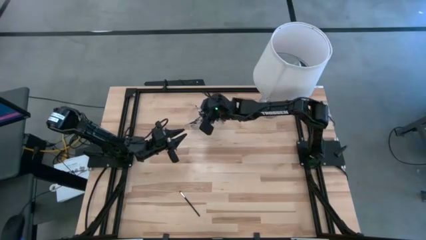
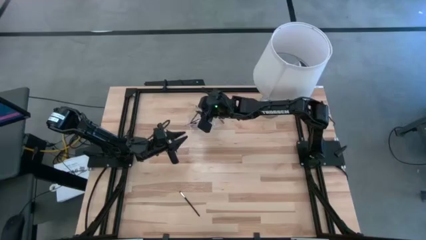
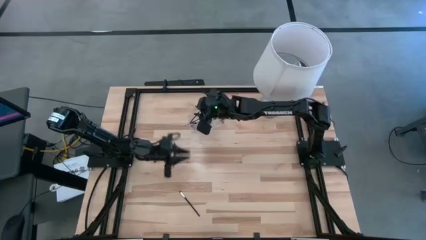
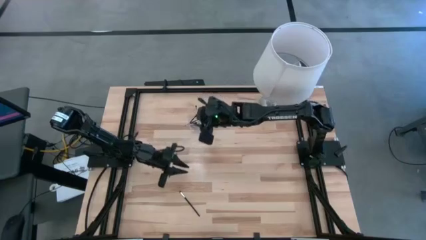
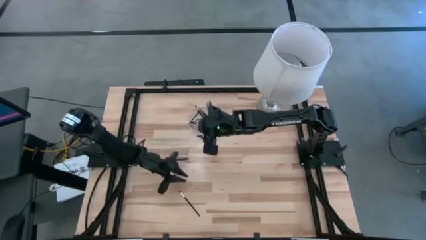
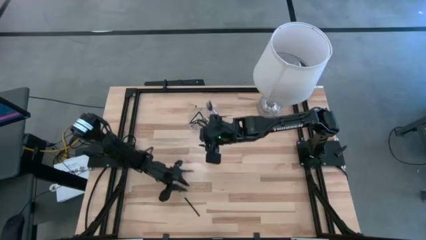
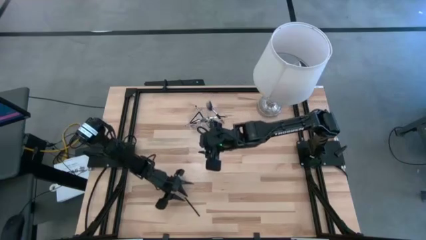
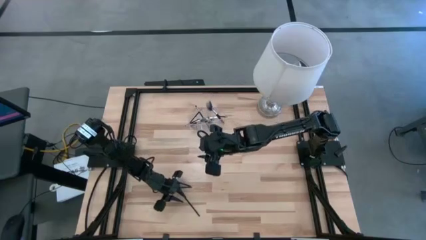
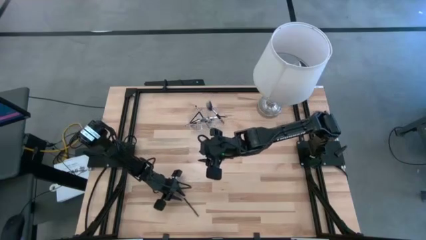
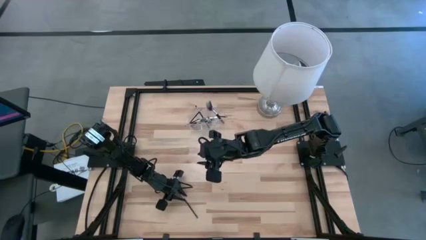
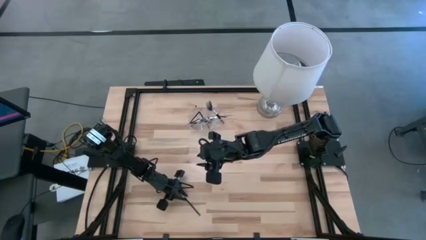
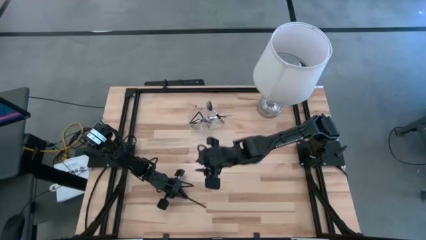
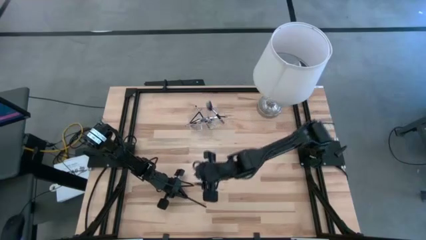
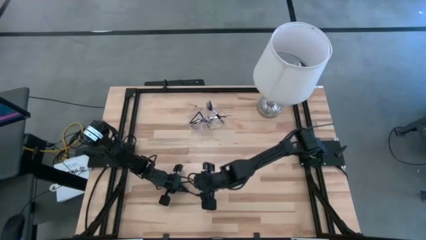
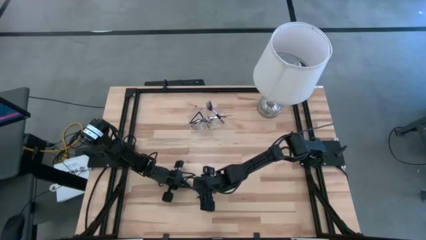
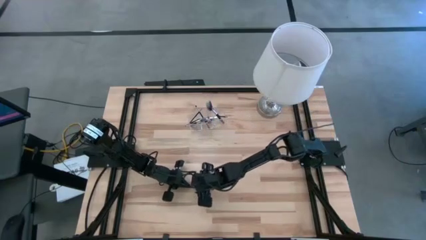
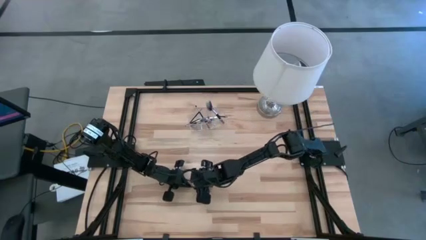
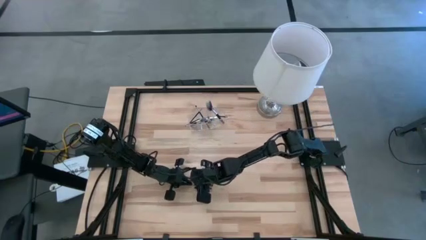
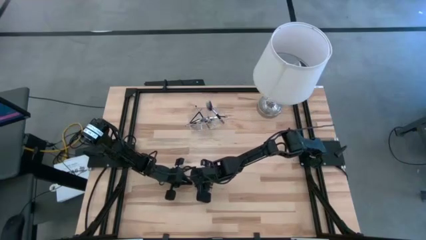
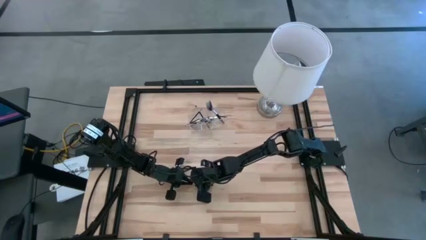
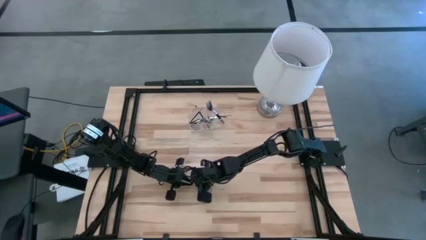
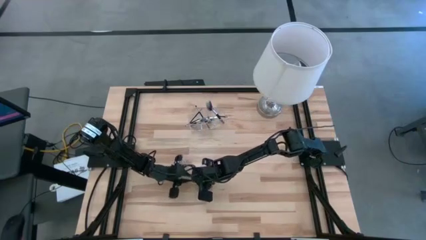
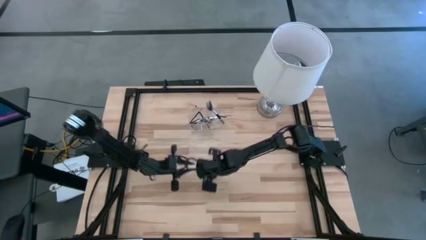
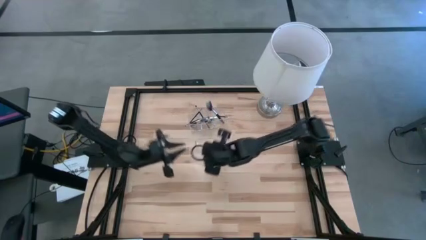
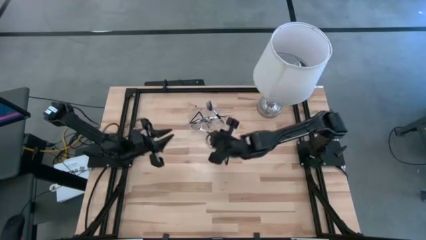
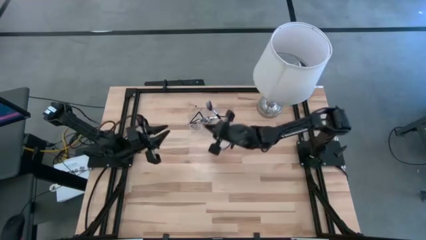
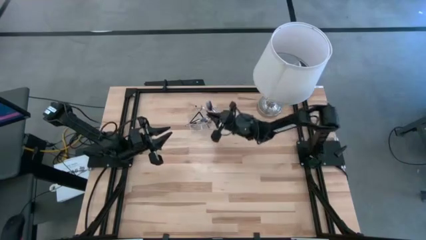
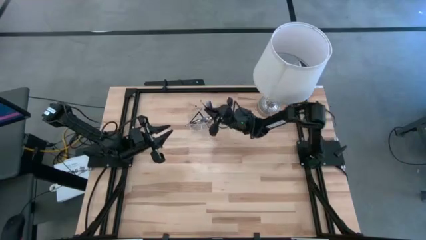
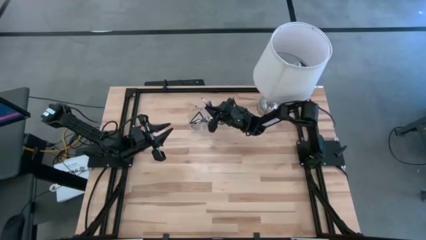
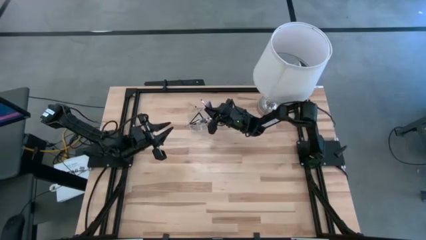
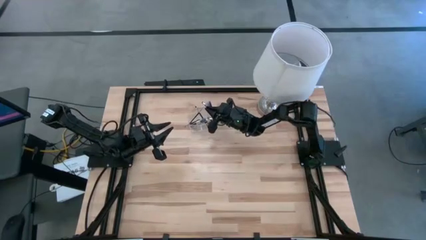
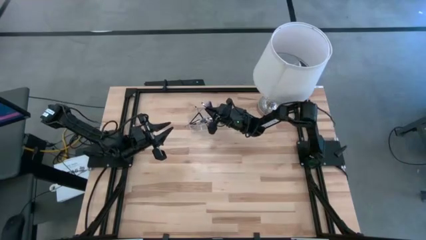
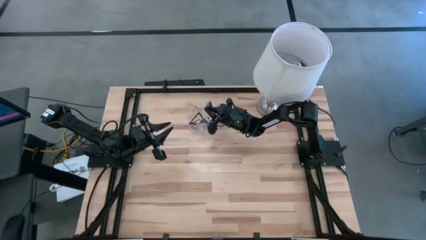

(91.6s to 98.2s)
Task: Sort items
Put the black eyeshadow brush into the transparent organizer

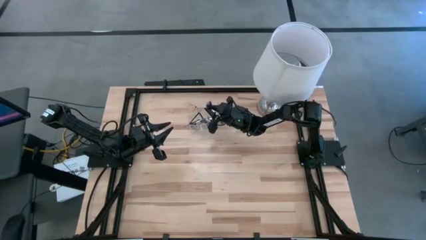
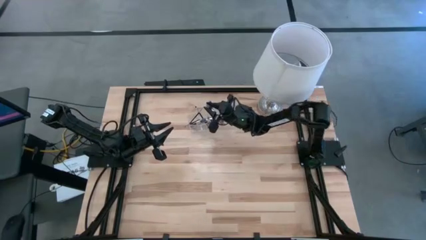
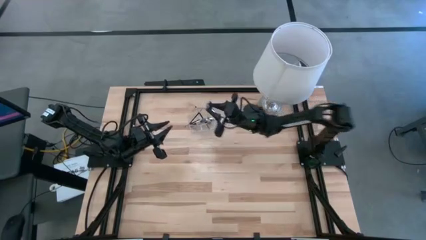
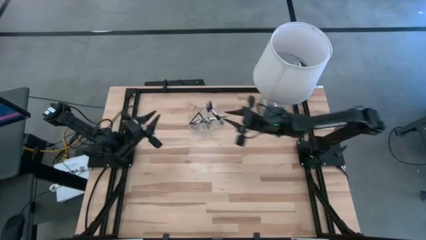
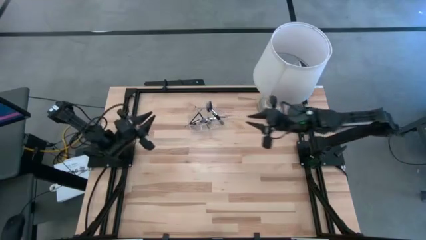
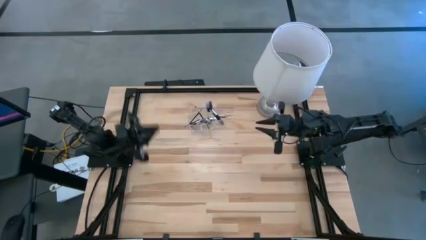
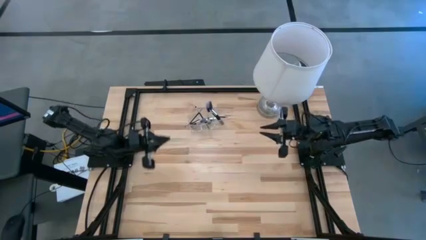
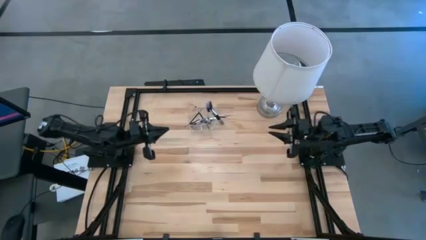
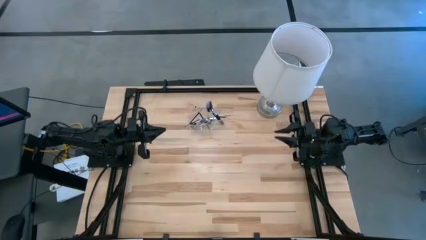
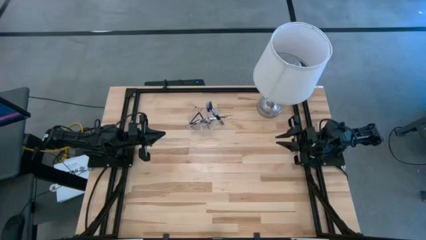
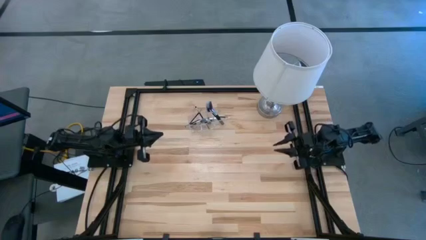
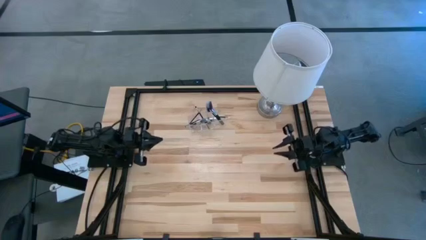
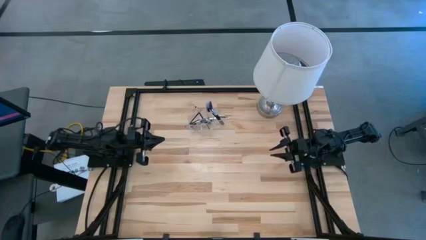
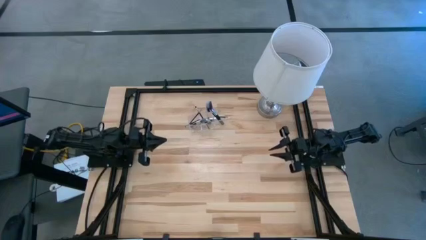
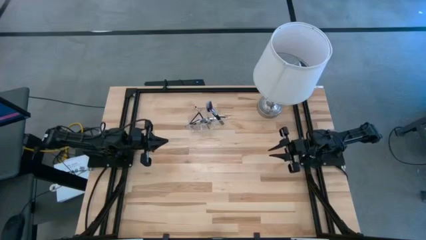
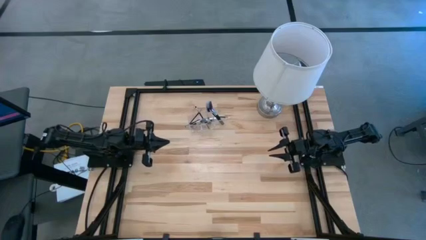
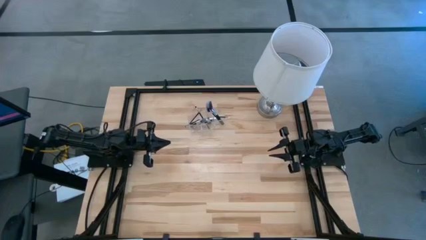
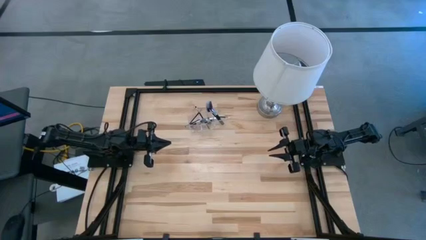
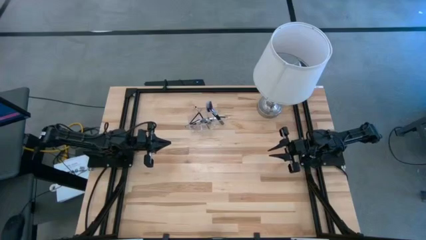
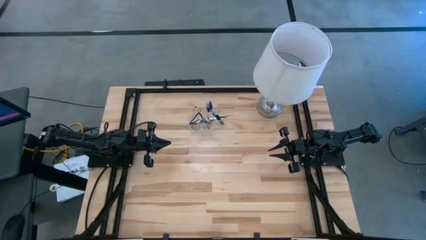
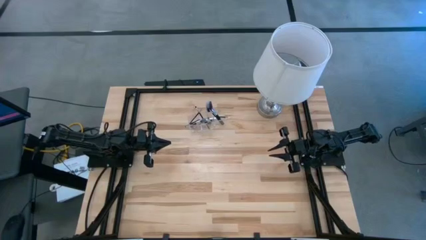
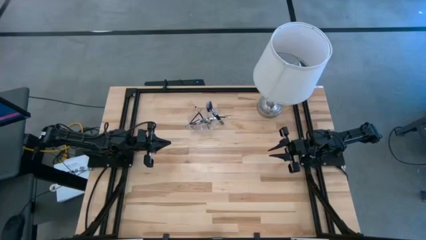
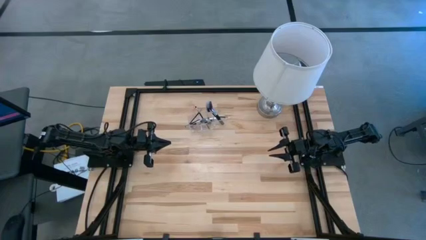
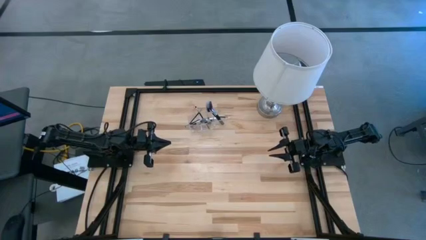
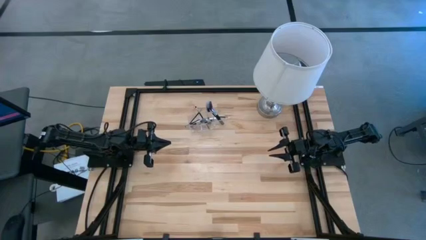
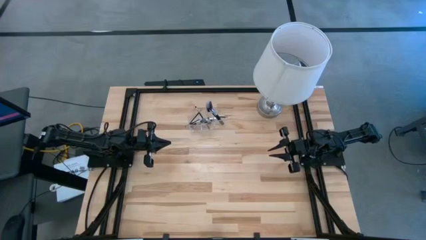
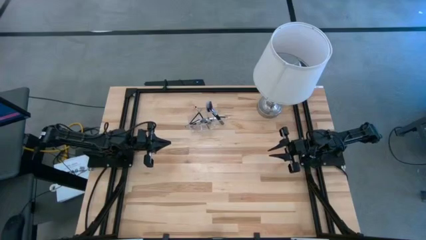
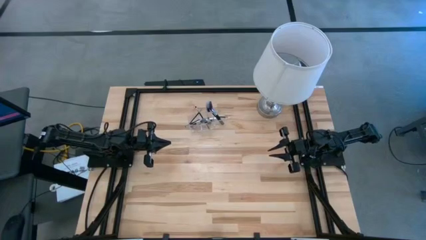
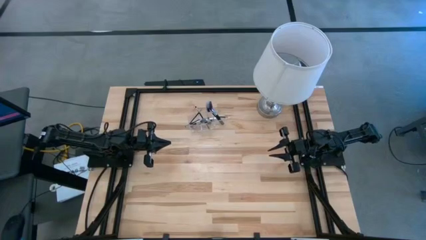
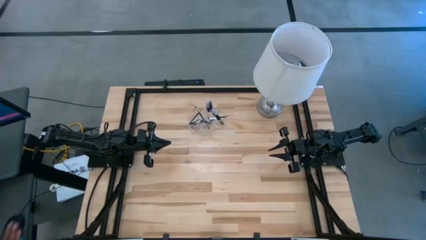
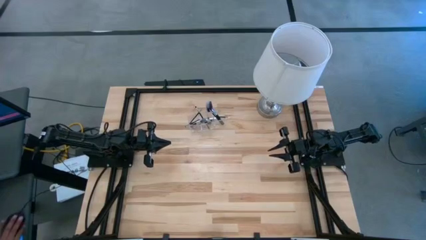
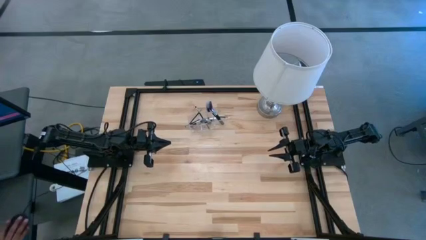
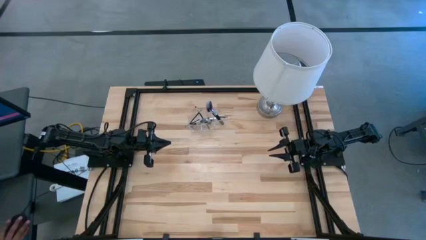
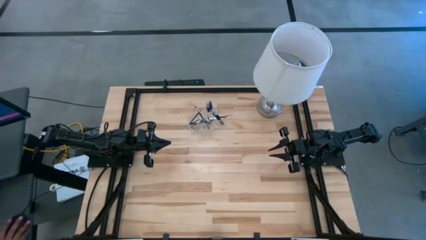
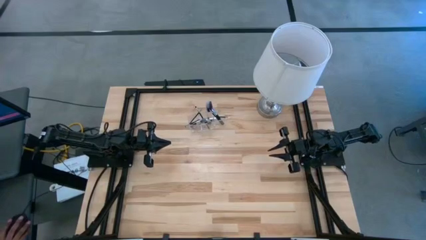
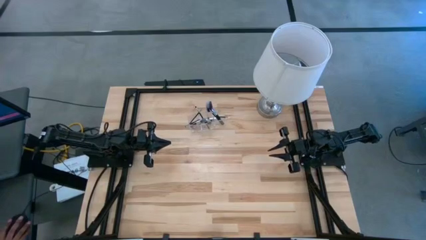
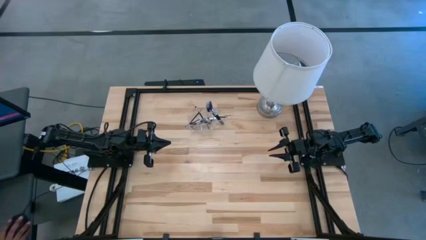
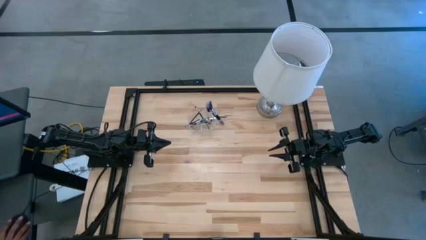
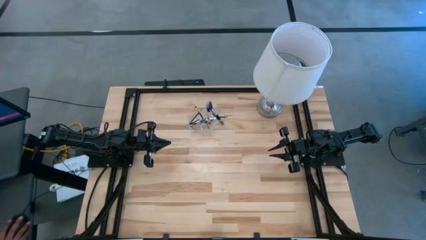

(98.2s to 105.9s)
Return to Home Position
